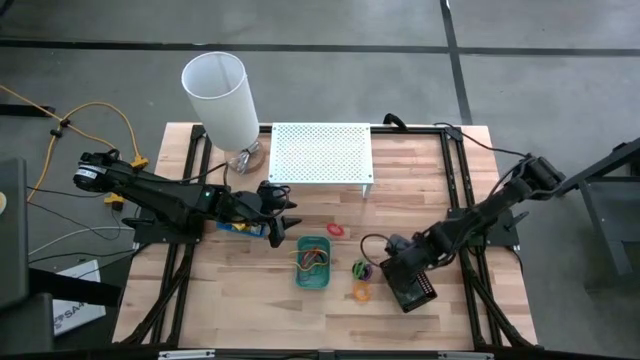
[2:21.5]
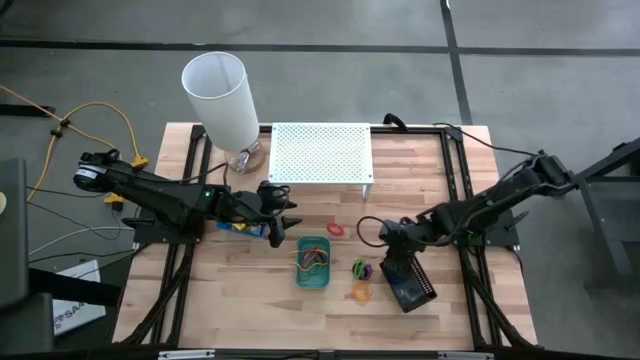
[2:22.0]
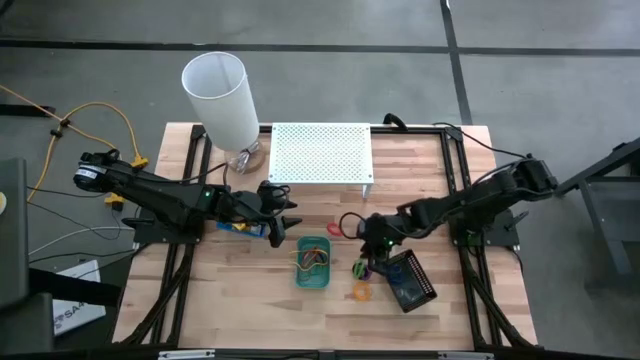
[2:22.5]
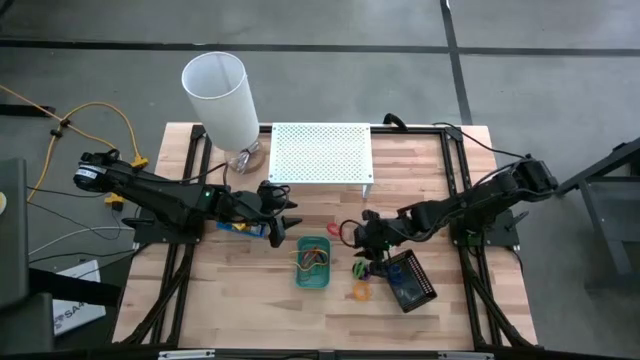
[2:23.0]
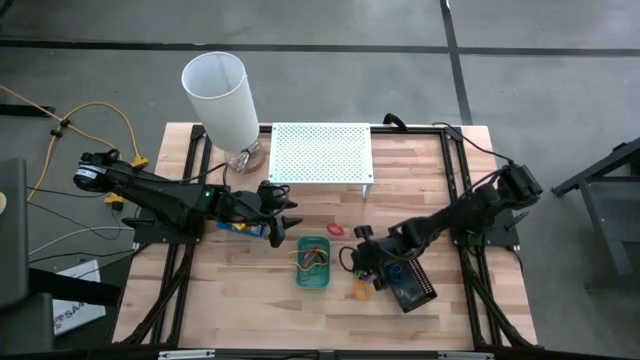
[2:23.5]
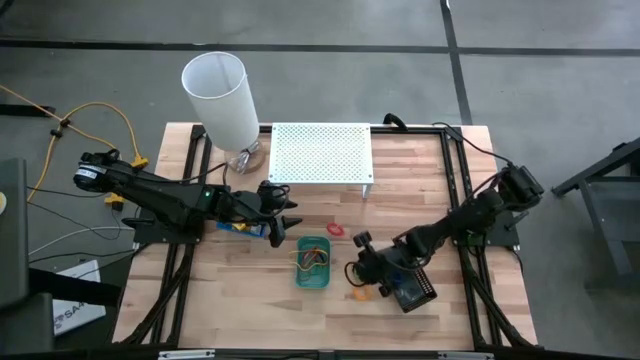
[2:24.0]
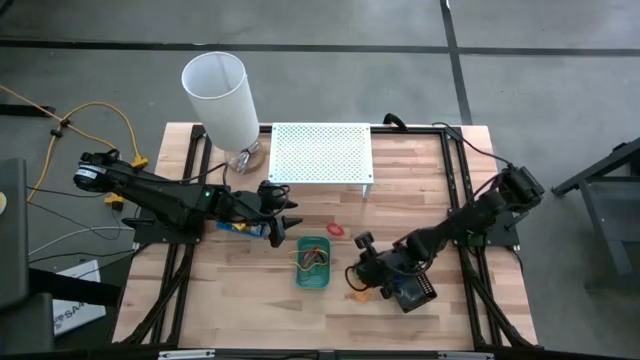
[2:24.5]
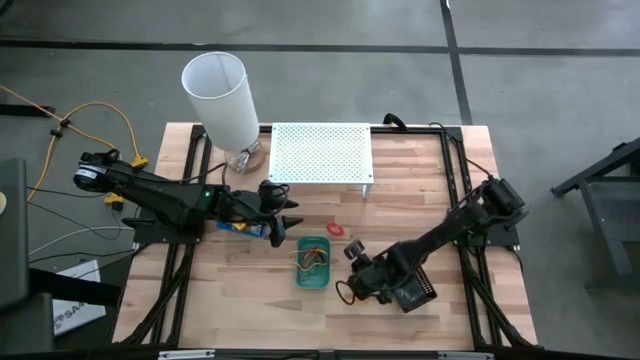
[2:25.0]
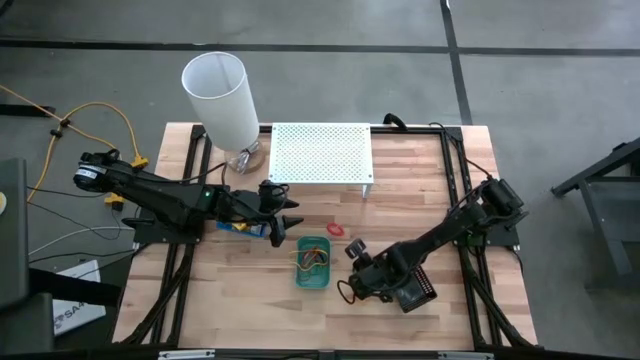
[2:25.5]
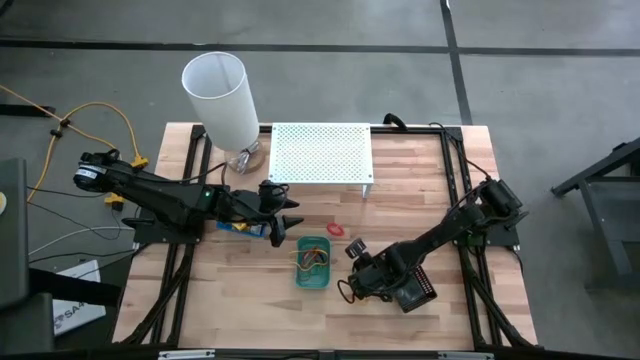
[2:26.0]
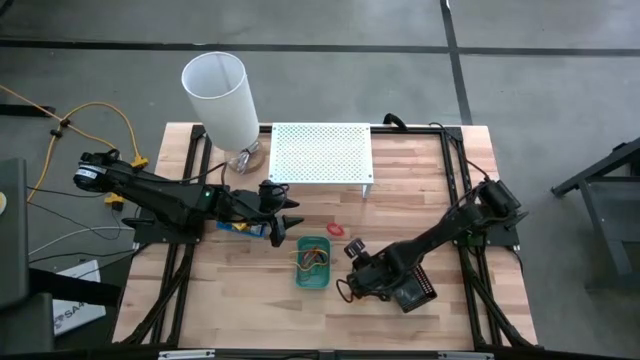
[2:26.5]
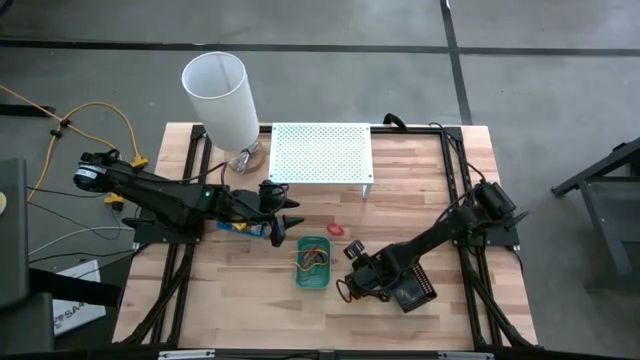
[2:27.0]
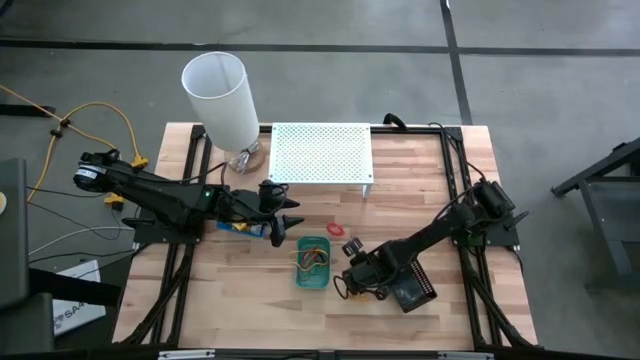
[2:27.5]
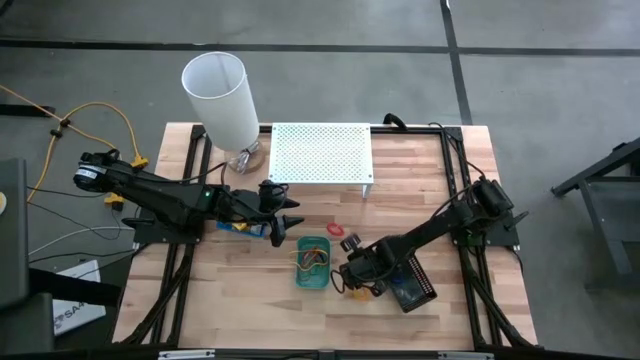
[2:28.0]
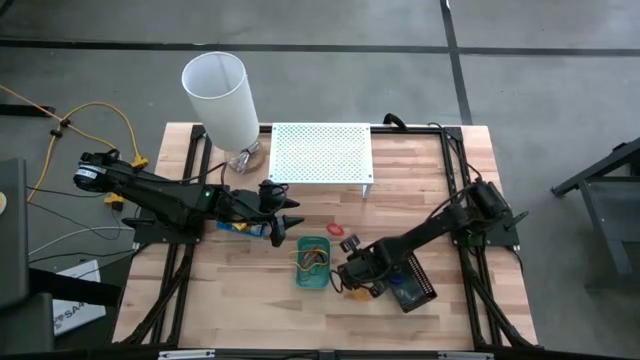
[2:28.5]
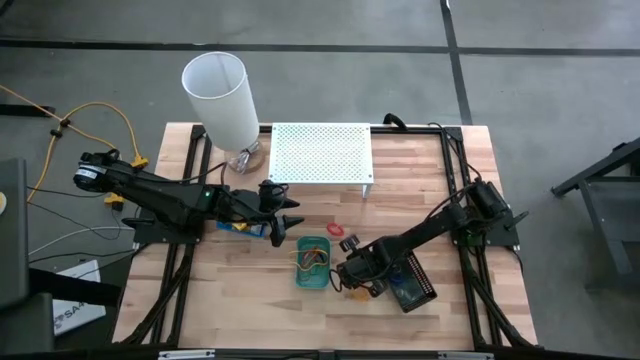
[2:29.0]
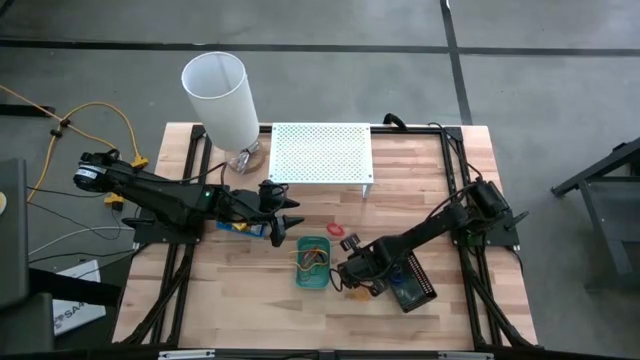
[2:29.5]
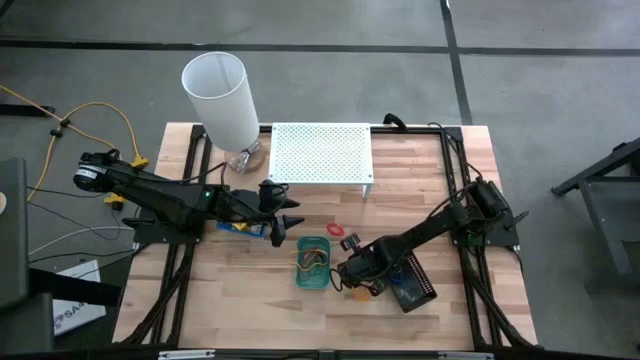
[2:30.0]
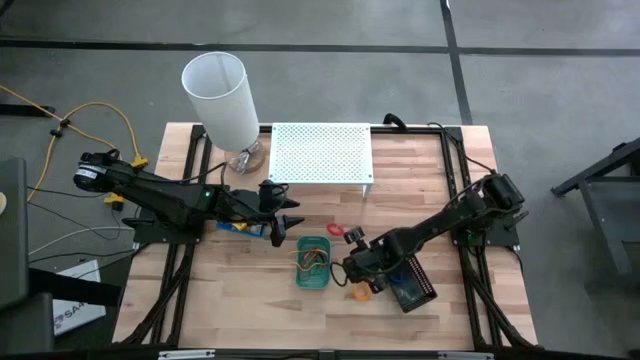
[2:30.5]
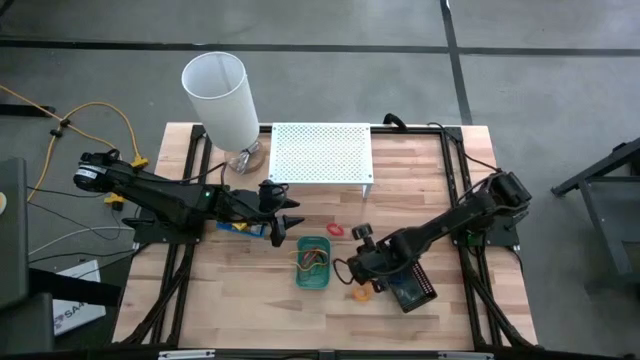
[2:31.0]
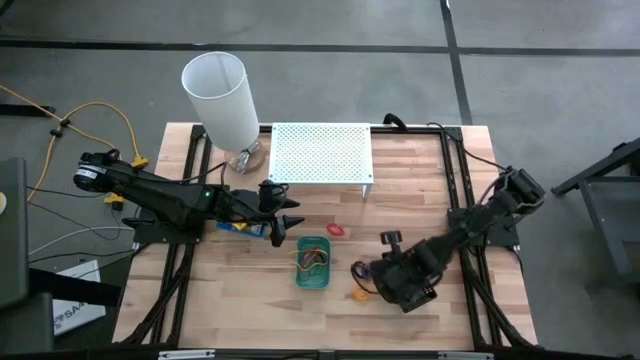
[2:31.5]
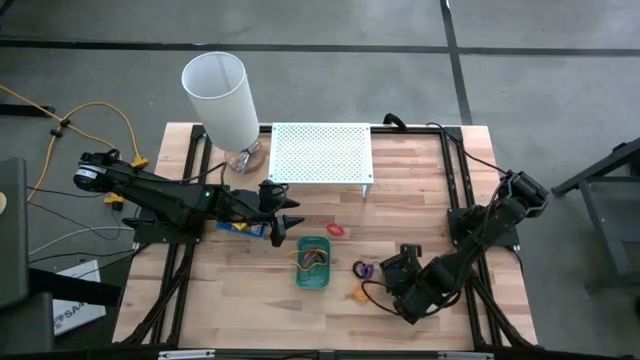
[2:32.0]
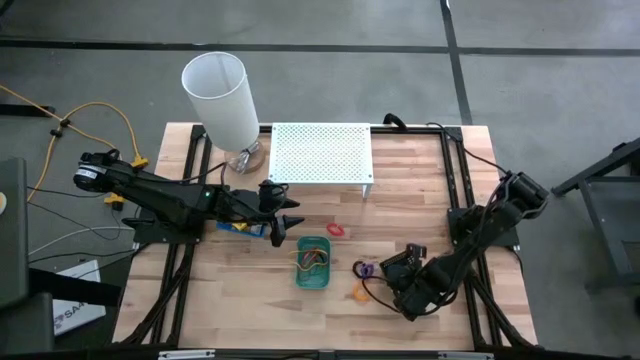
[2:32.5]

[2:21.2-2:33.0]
Task: Pick & Place Office Desk Supplies
Put the green spiral keychain band into the black bin

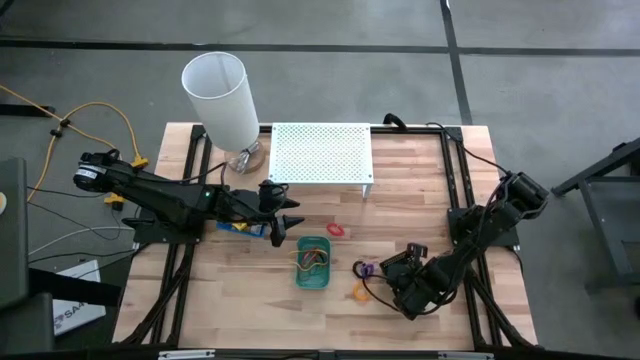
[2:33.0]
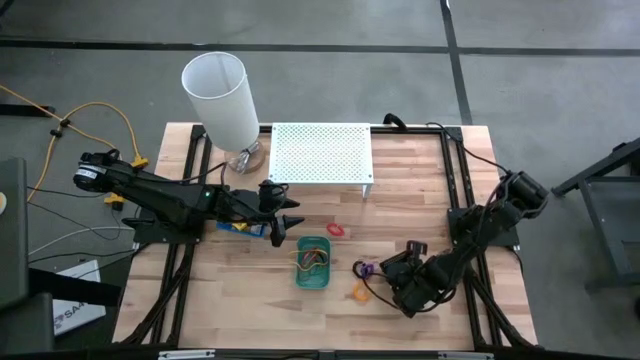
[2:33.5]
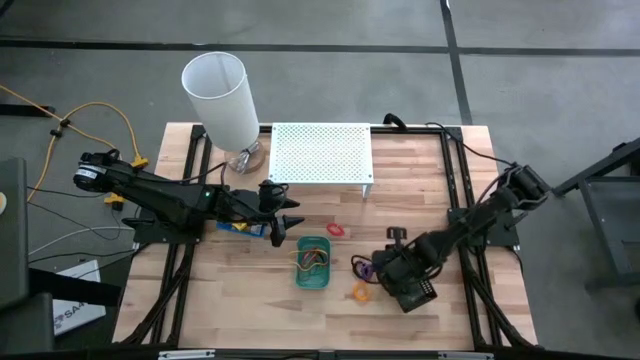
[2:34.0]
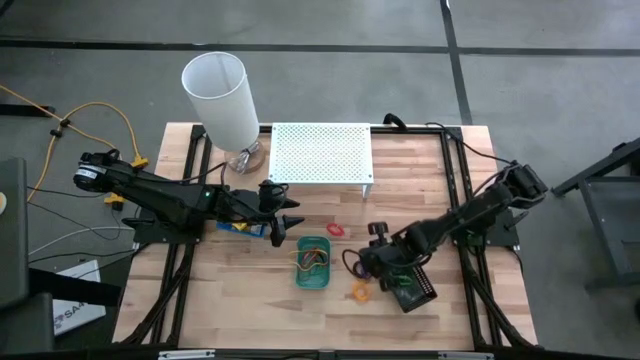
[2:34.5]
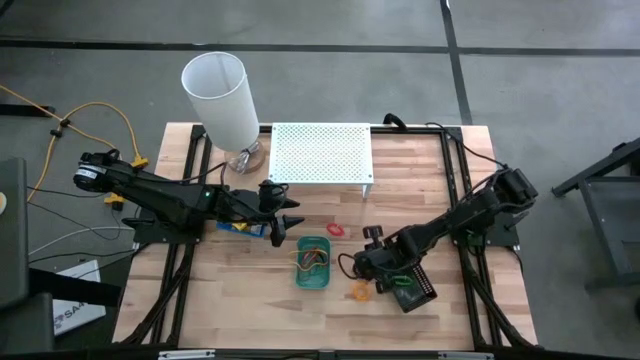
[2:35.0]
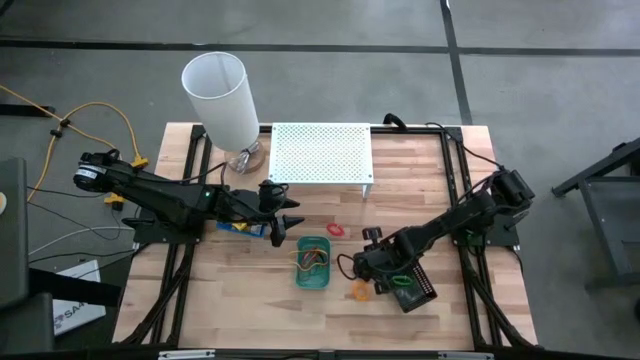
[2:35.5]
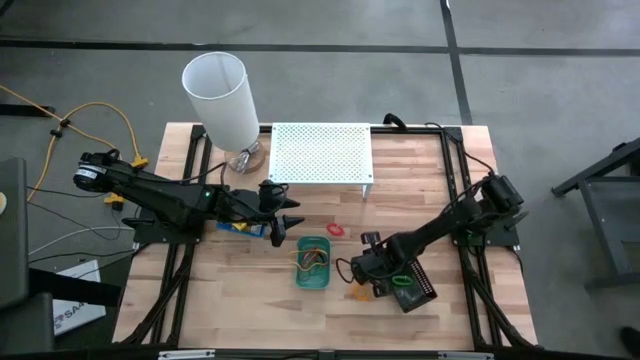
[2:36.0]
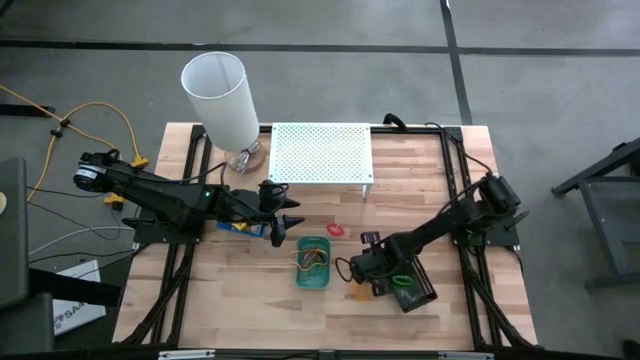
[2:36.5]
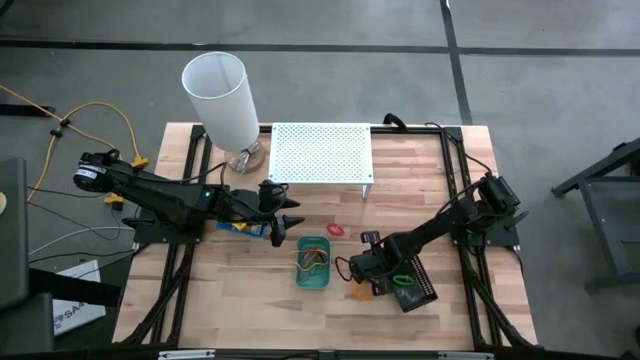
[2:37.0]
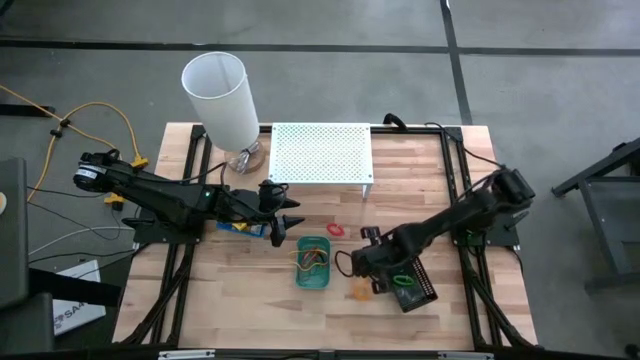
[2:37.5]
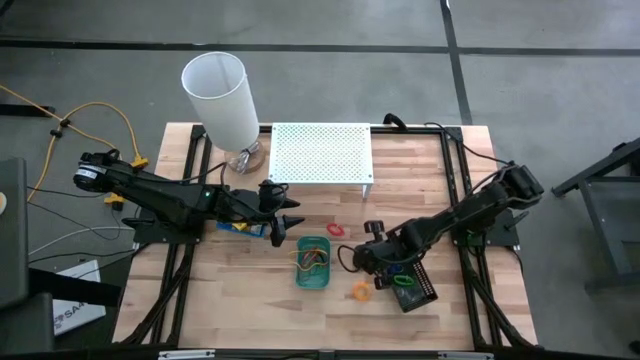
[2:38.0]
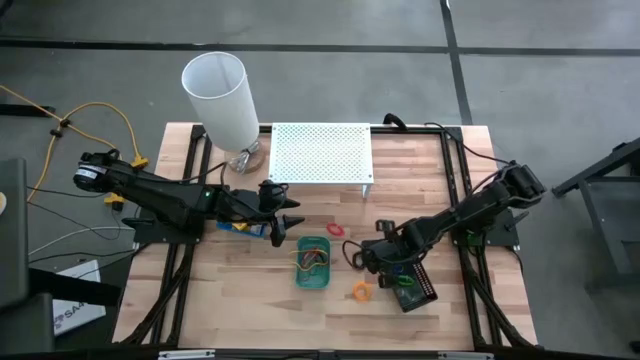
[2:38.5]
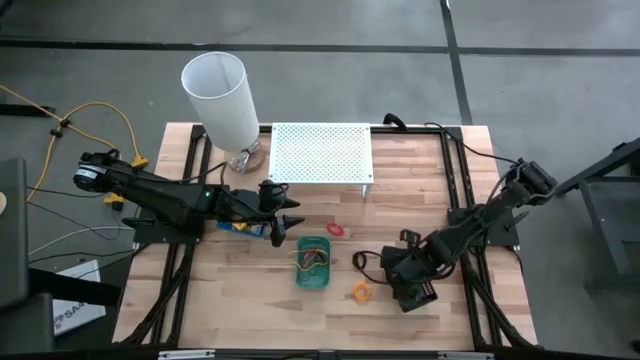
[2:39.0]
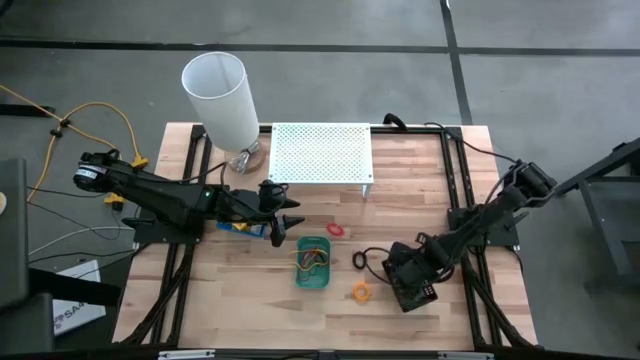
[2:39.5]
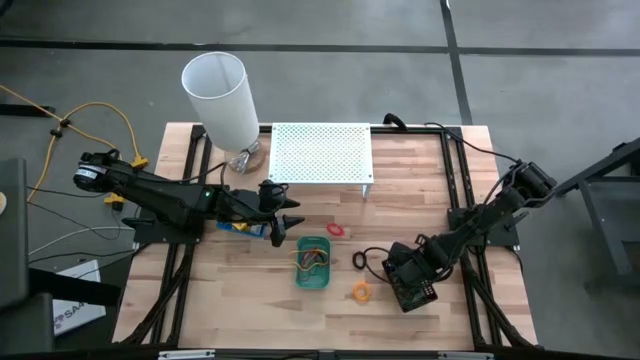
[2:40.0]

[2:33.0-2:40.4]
Put the purple spiral keychain band into the black bin

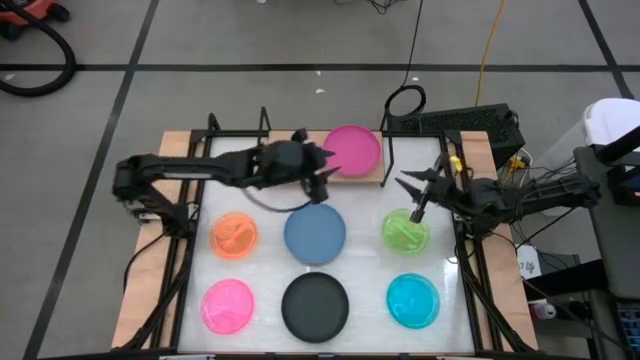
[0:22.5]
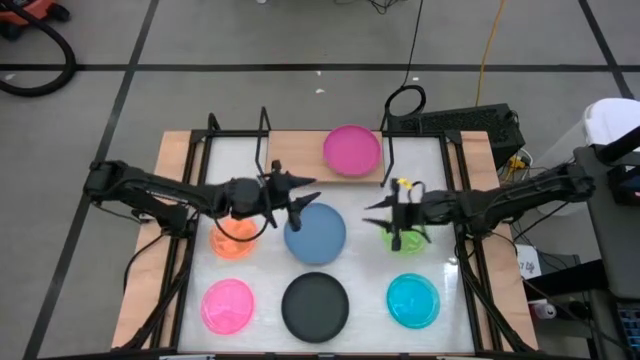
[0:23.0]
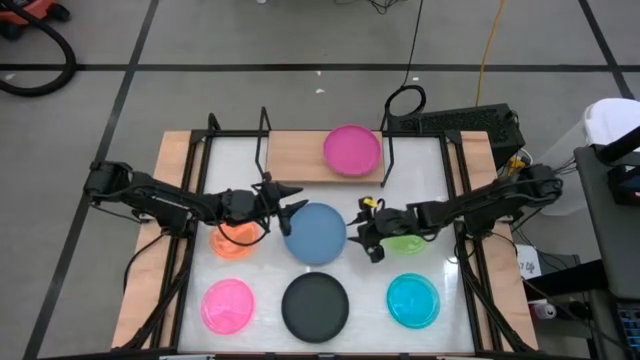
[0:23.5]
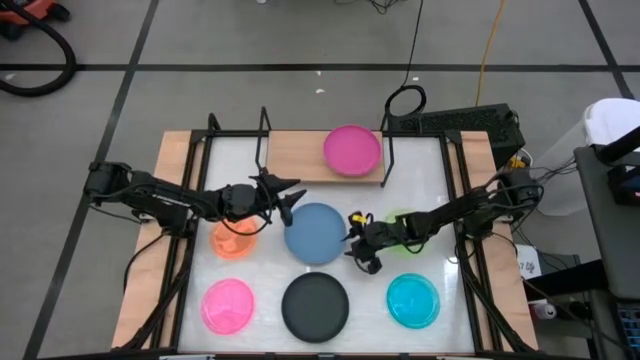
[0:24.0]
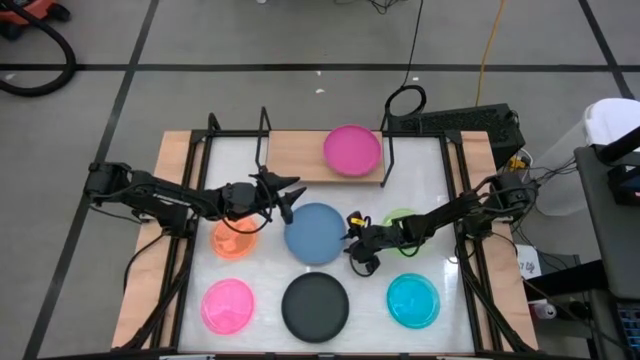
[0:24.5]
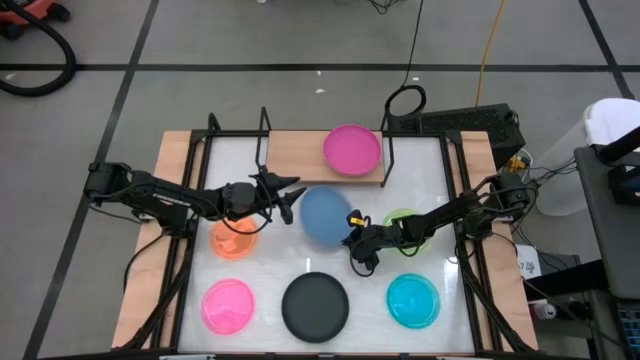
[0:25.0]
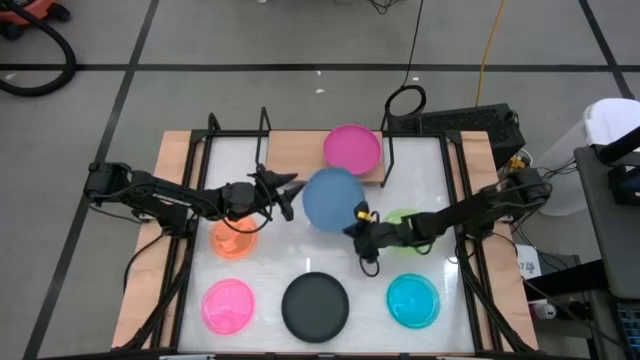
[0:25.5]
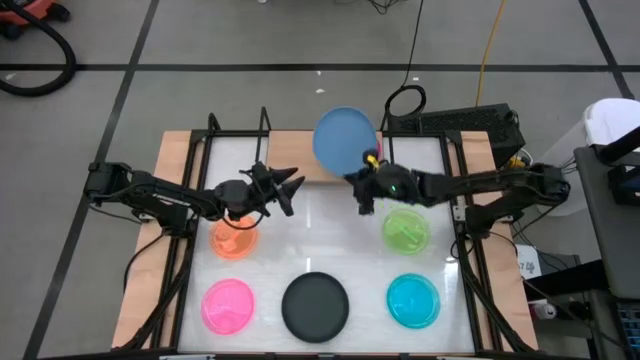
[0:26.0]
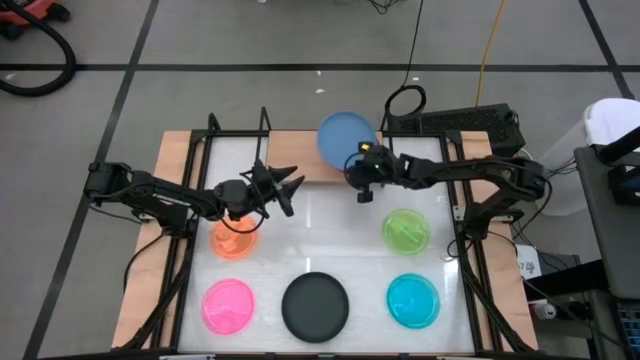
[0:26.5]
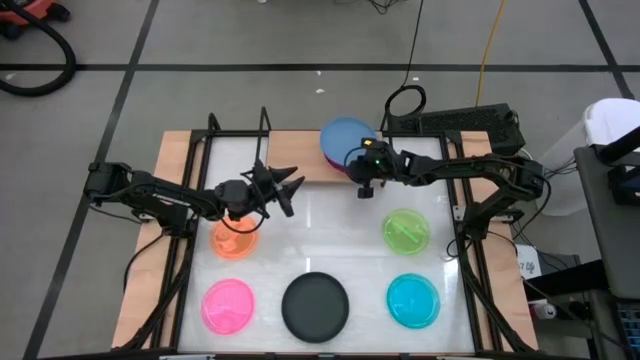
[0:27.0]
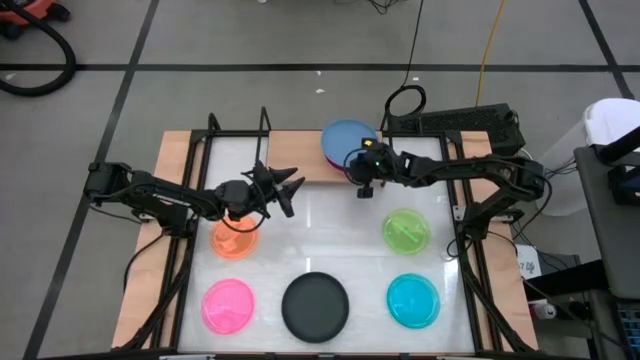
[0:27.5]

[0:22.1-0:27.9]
Task: Place and stack plates onto a shelf
Stack the blue plate on top of the pink plate on the shelf
